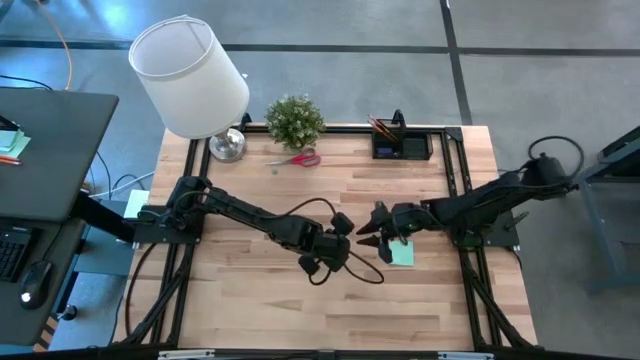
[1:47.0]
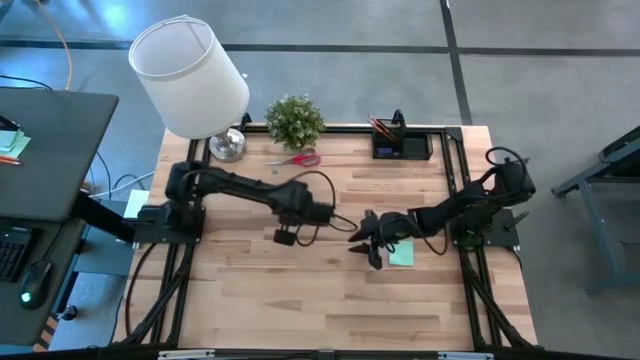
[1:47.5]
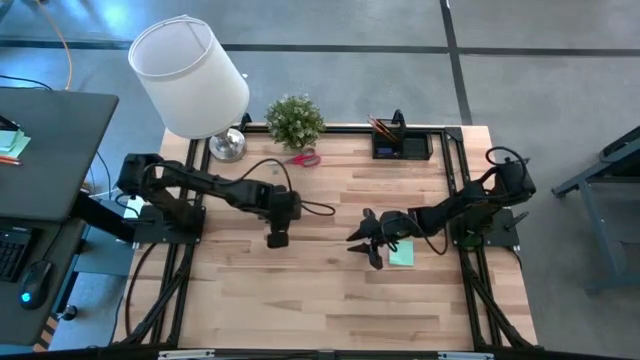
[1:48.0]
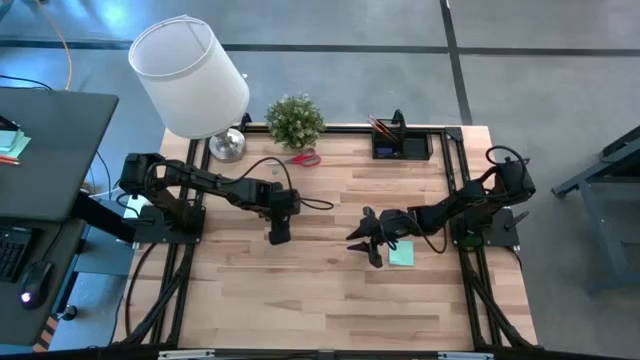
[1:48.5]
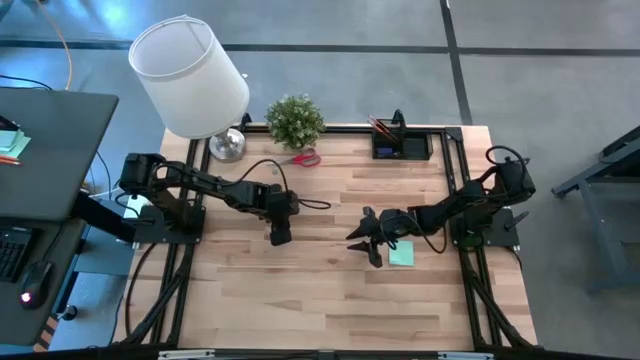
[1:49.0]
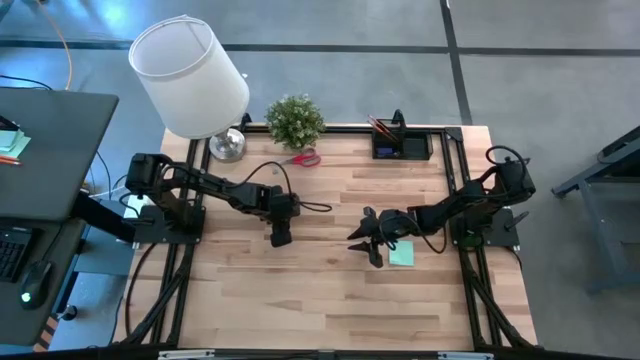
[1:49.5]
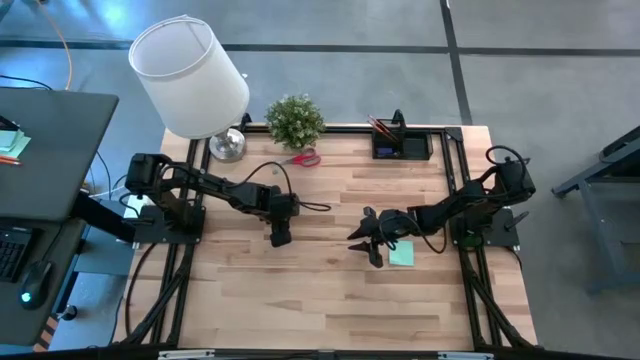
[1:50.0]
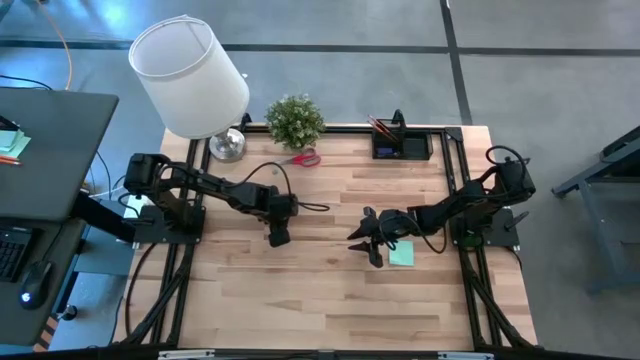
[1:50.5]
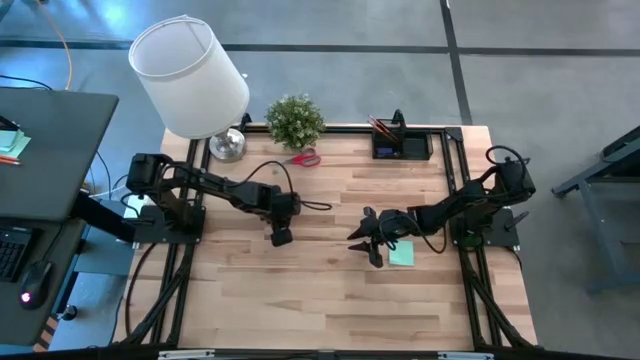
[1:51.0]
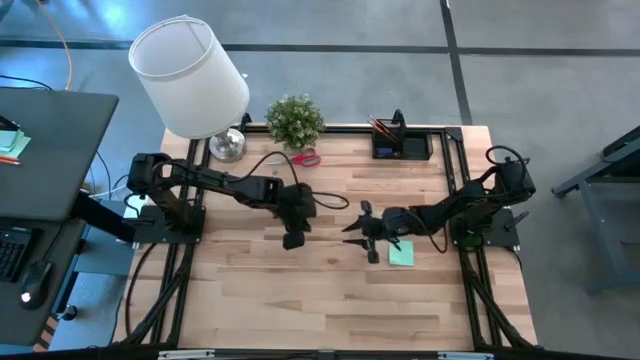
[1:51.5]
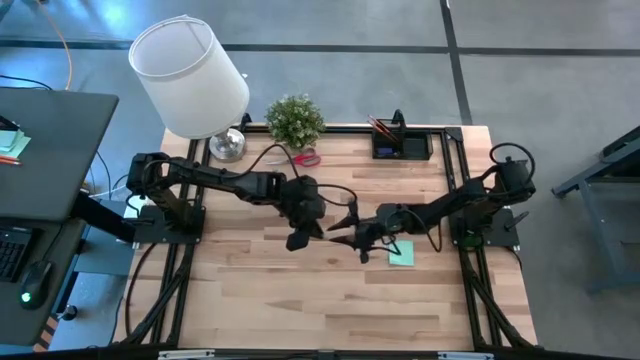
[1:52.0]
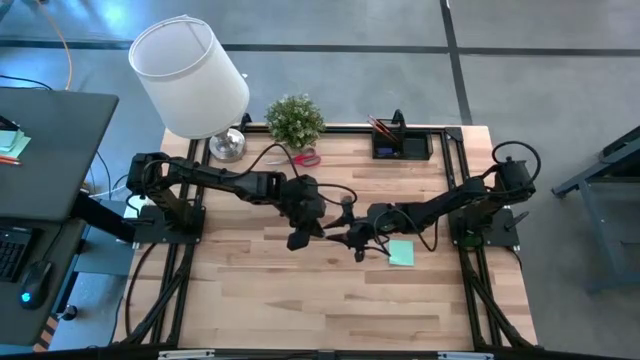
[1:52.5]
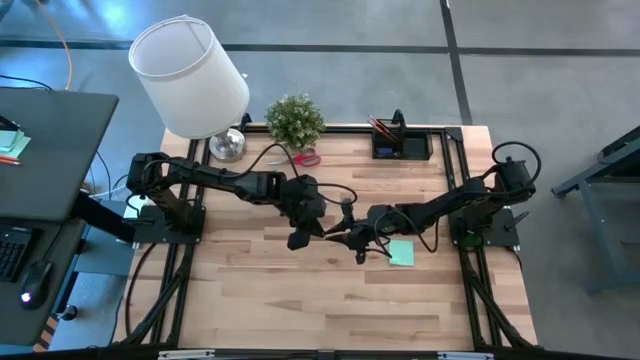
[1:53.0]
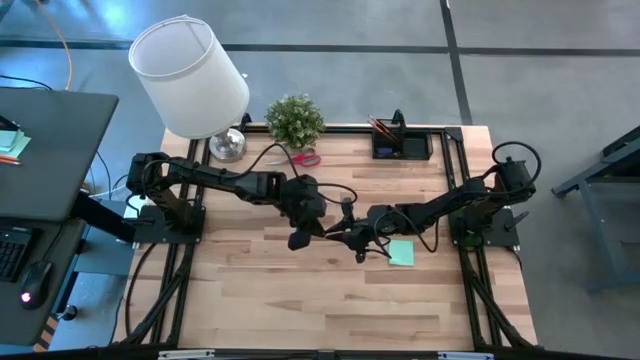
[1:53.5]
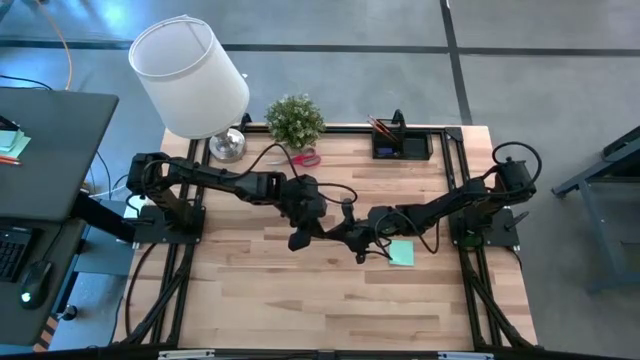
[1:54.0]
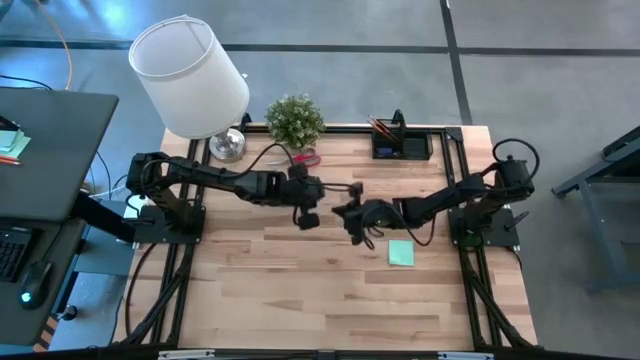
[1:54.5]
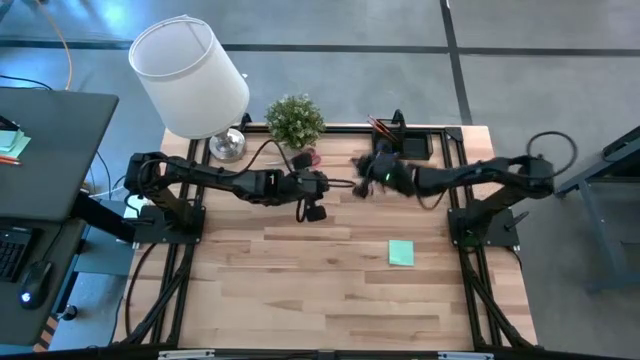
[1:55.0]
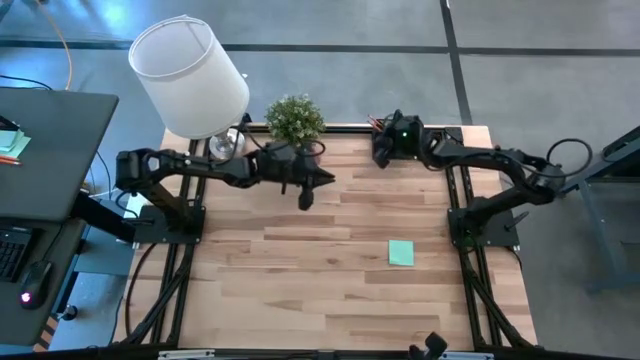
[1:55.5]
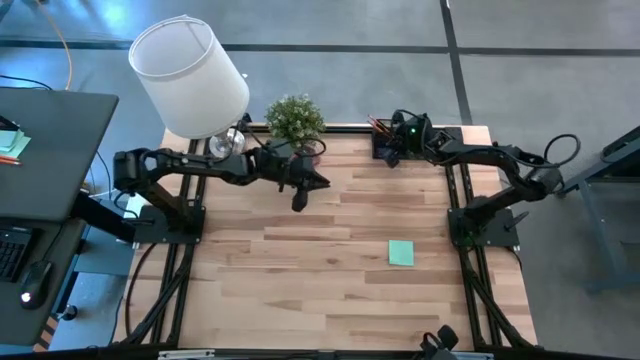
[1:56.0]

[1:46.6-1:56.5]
Task: Pick and place office supplies into organizer
Put the bottom light blue binder clip in the black desk organizer

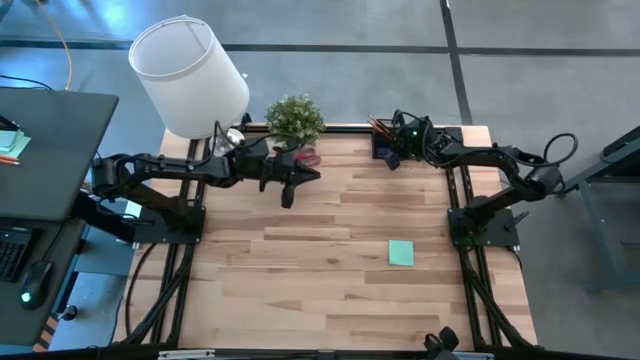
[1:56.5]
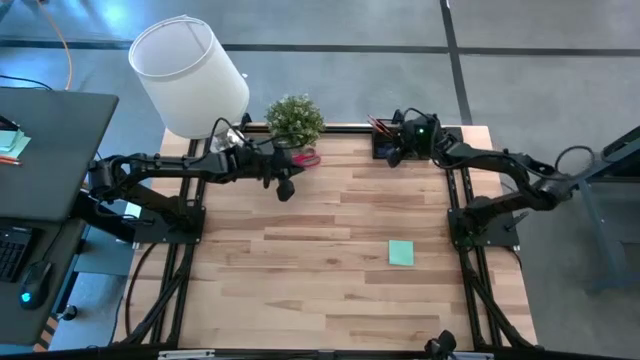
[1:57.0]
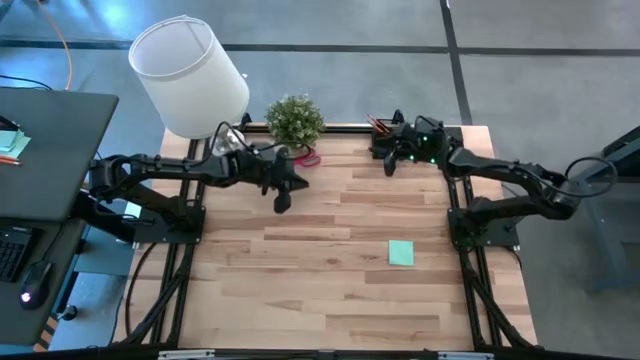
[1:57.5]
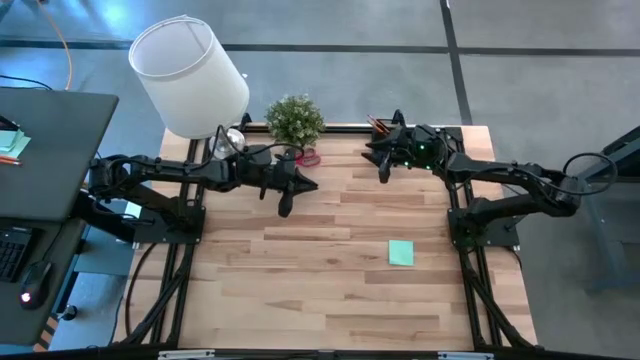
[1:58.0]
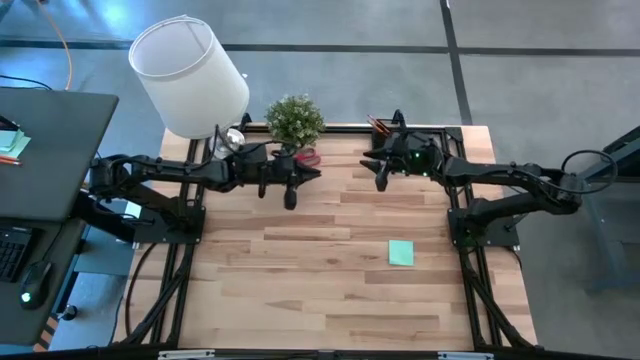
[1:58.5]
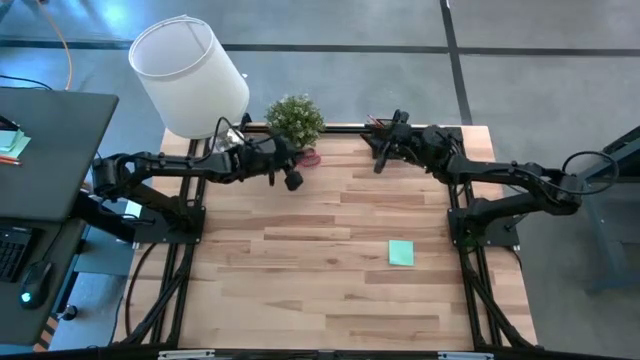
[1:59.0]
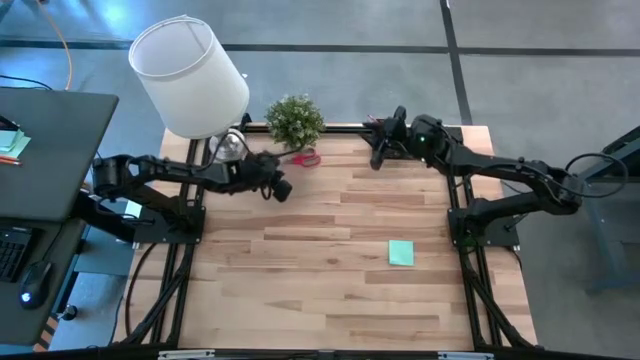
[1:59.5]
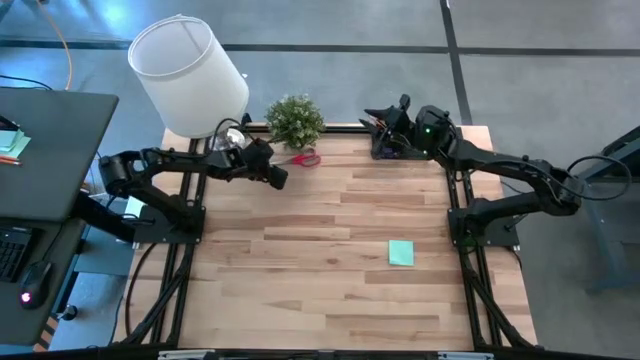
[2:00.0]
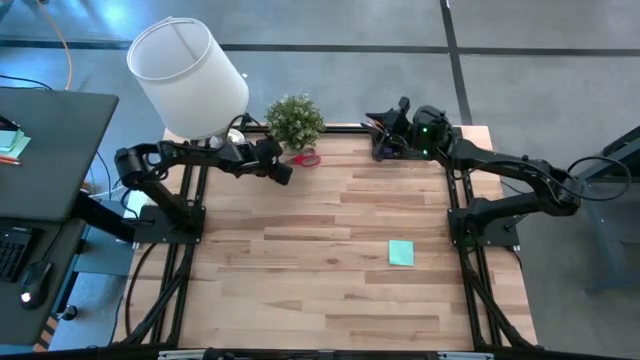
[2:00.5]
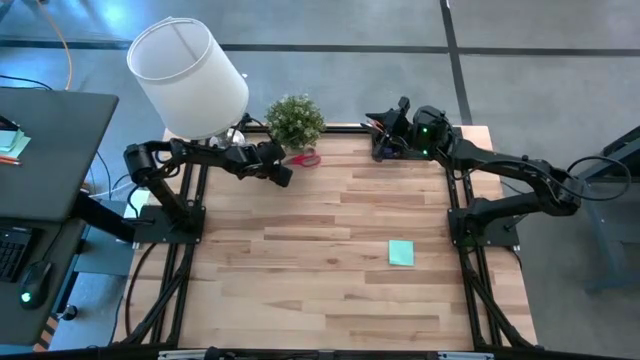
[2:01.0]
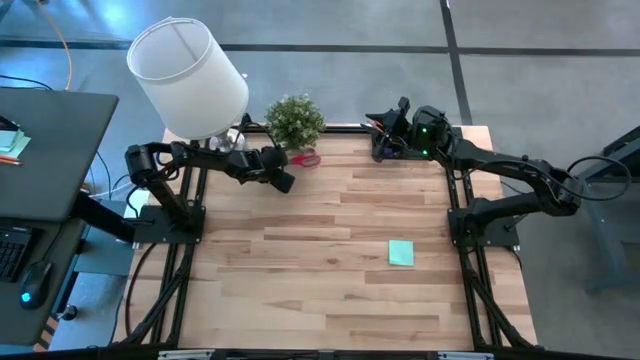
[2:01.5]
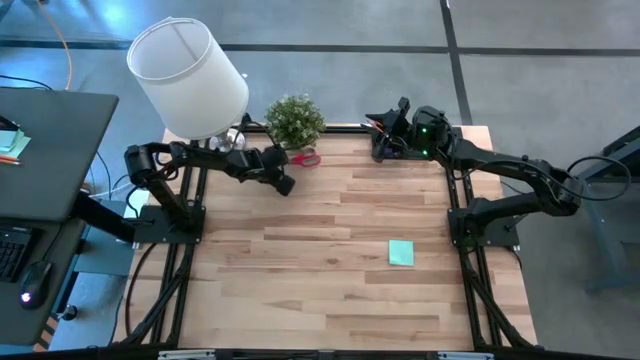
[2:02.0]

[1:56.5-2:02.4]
Put the light blue binder clip in the black desk organizer

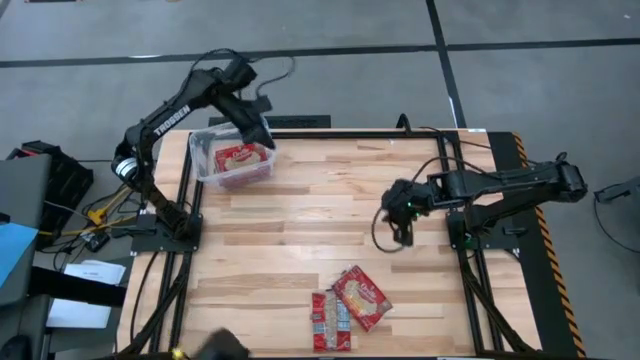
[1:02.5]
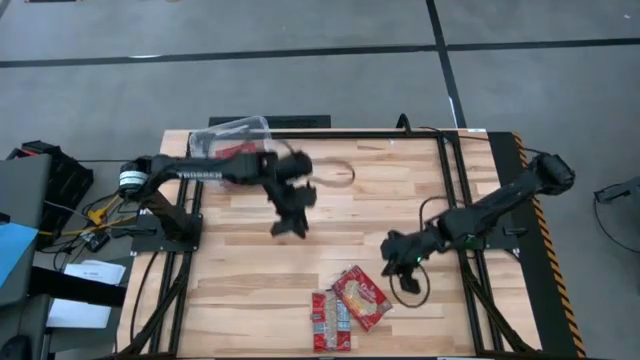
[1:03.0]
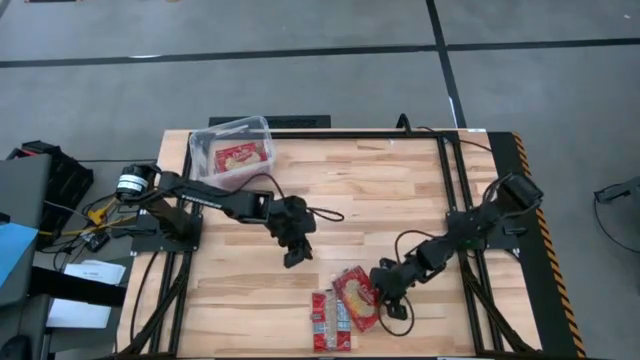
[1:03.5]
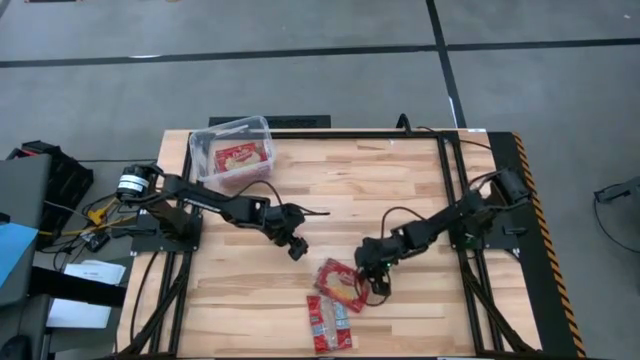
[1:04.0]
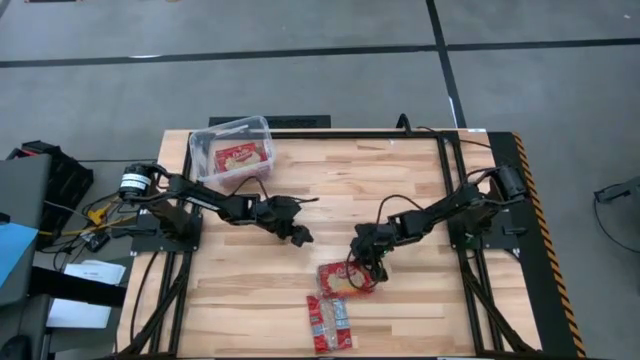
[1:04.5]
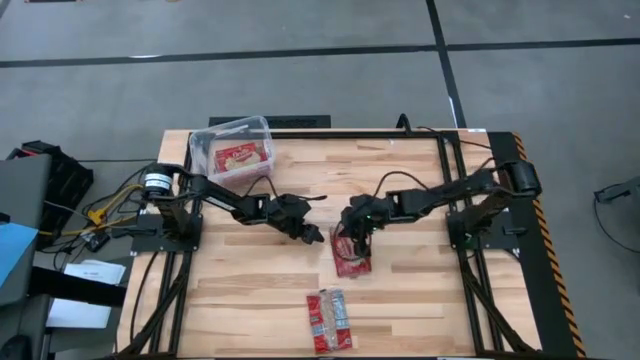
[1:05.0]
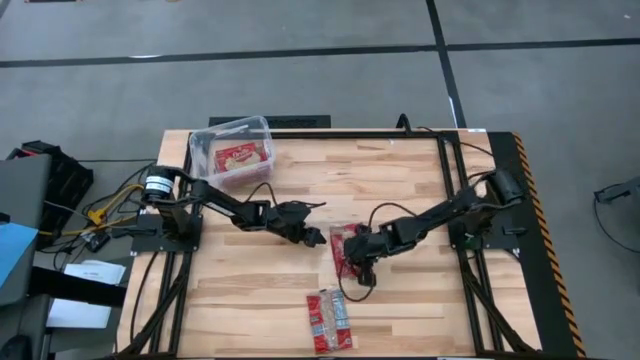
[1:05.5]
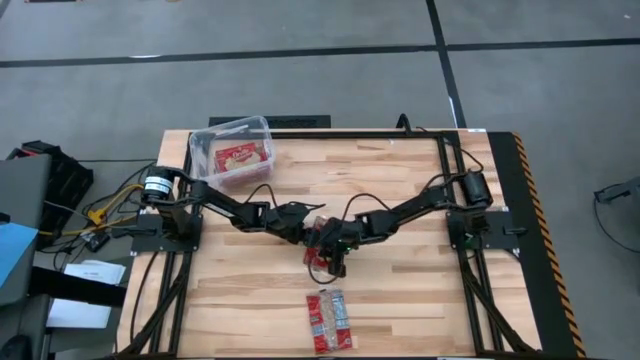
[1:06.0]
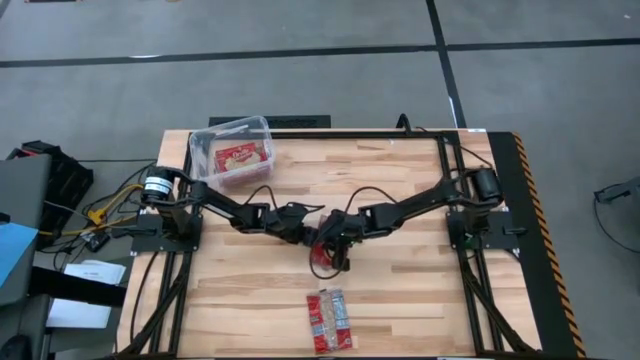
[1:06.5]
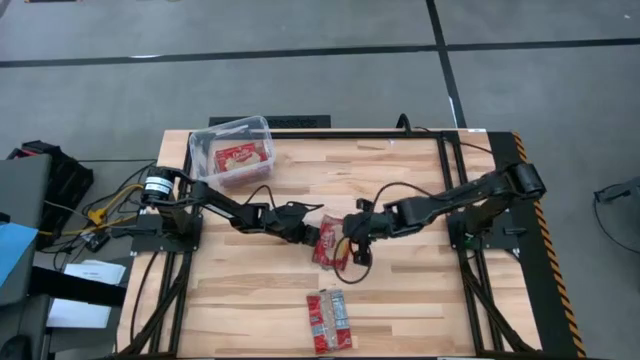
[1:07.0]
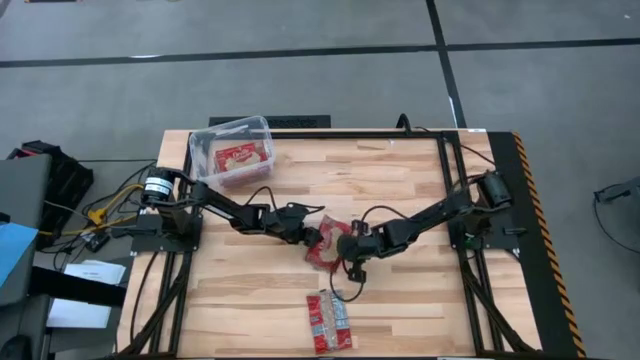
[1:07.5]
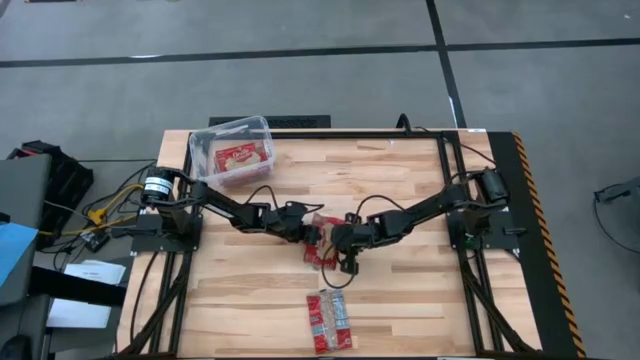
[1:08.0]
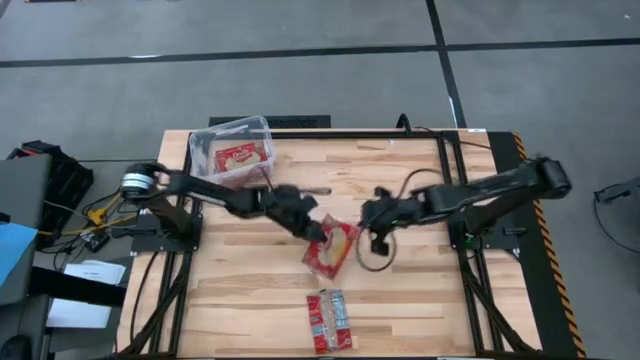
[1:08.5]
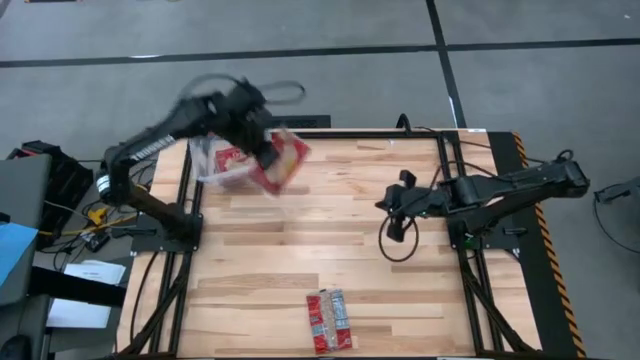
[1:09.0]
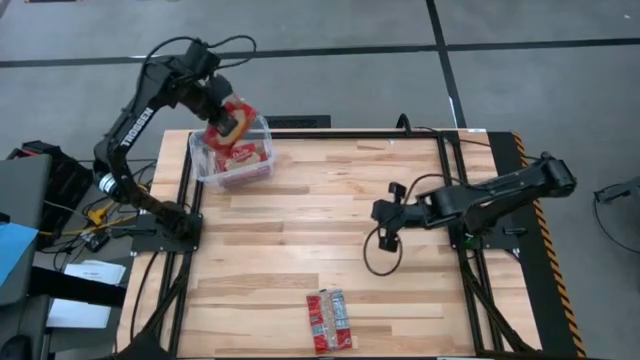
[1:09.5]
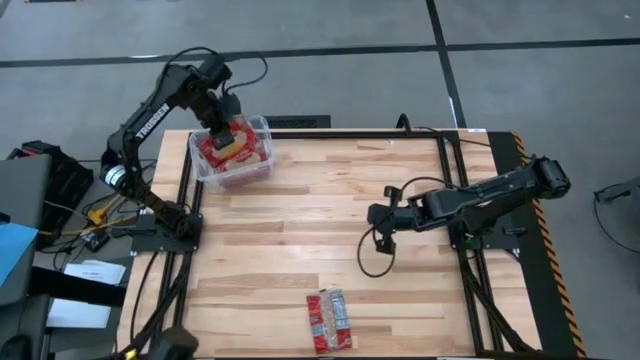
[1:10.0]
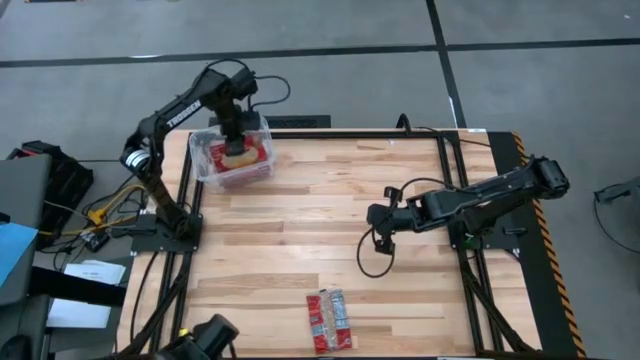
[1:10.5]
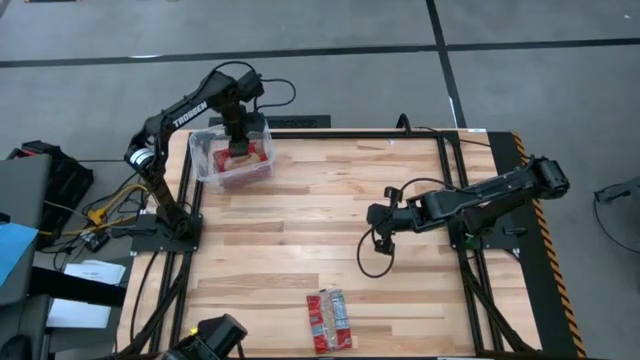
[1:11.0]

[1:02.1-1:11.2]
Task: Sort popcorn bags into baskets
Put the red popcorn bag into the transparent bin
